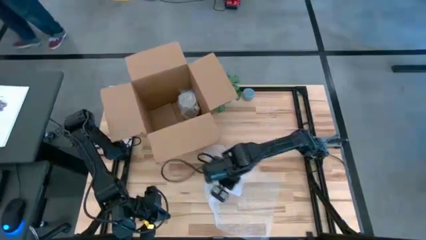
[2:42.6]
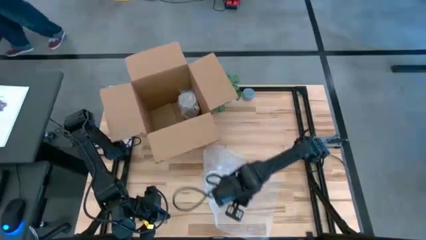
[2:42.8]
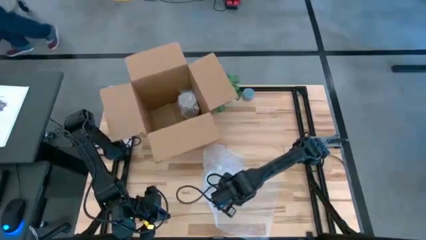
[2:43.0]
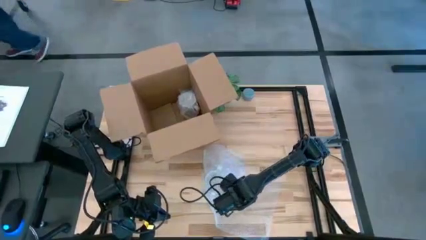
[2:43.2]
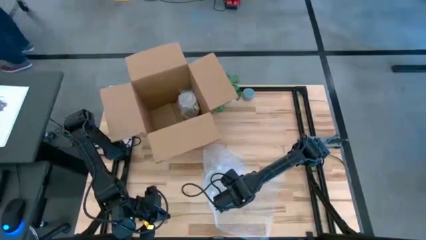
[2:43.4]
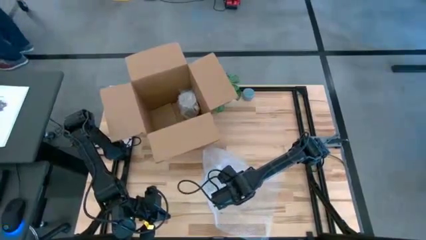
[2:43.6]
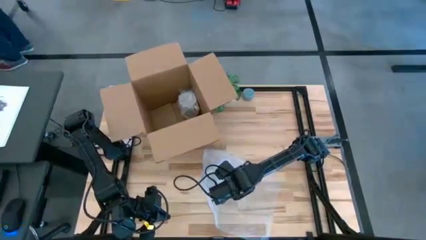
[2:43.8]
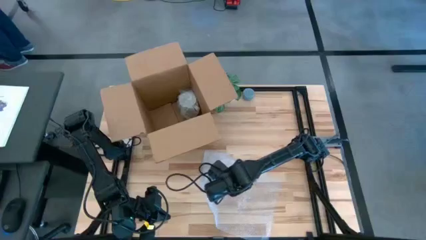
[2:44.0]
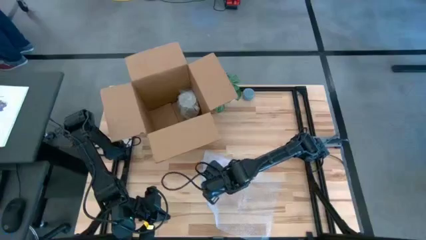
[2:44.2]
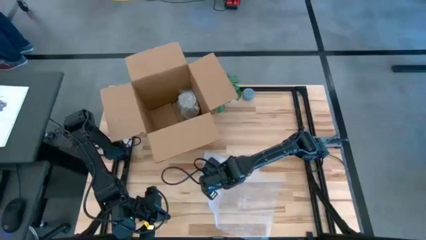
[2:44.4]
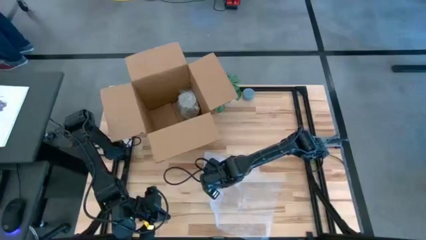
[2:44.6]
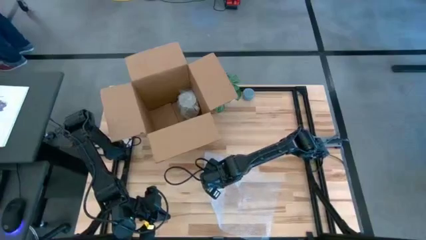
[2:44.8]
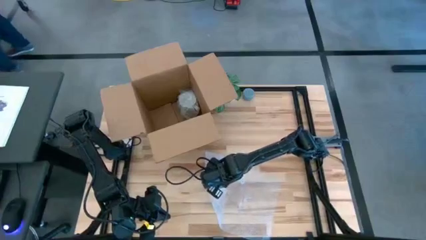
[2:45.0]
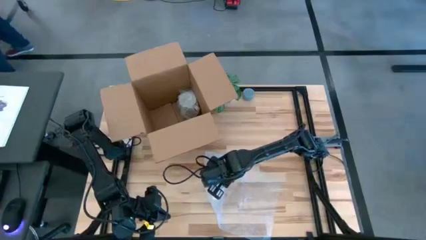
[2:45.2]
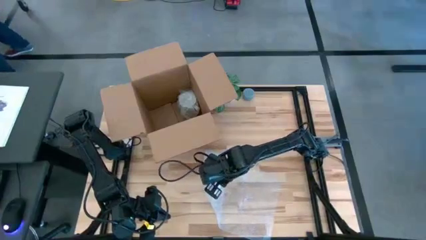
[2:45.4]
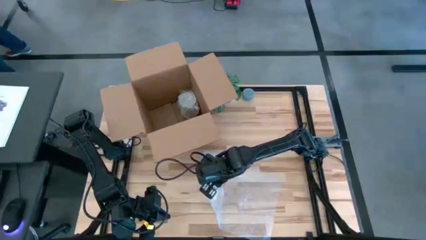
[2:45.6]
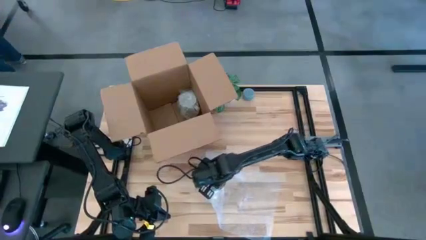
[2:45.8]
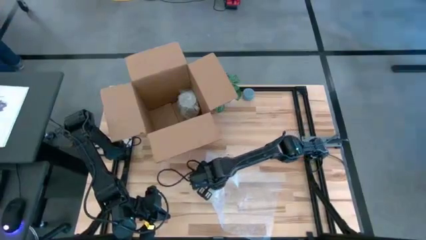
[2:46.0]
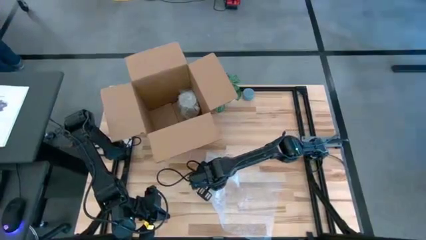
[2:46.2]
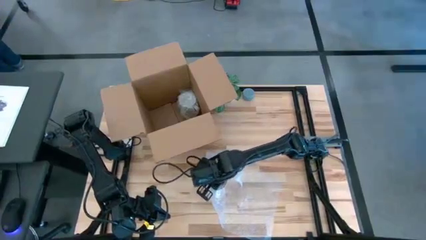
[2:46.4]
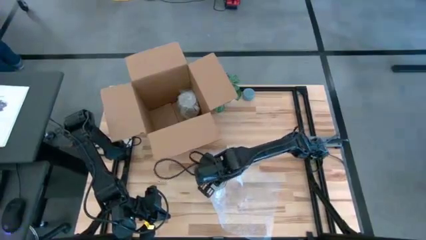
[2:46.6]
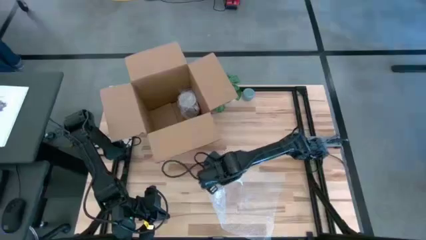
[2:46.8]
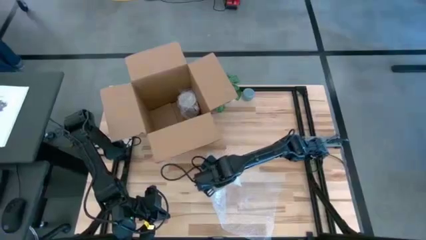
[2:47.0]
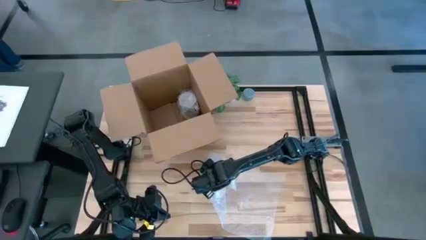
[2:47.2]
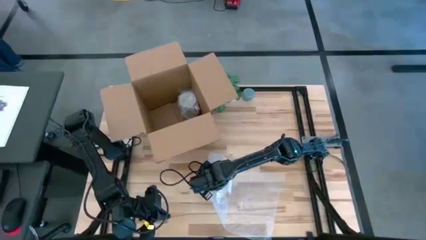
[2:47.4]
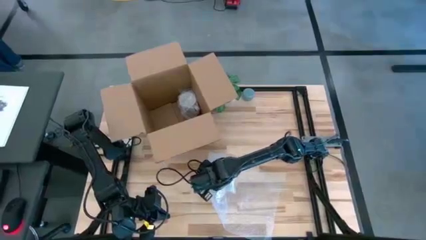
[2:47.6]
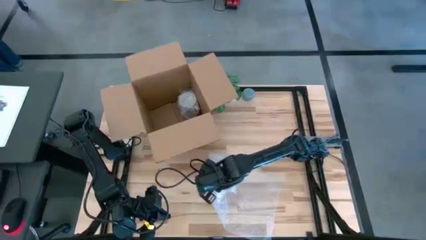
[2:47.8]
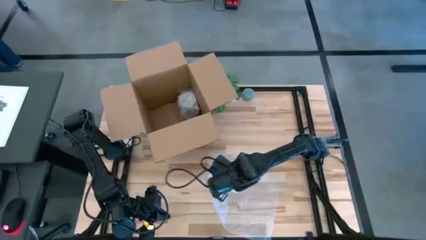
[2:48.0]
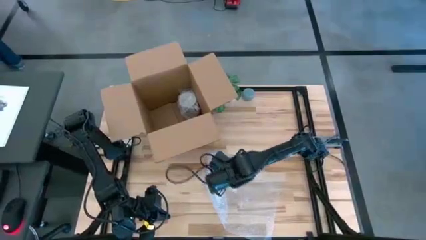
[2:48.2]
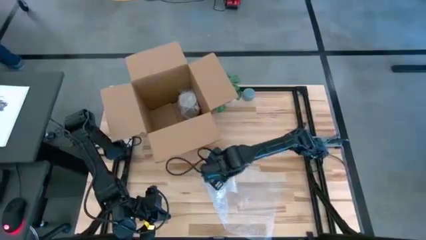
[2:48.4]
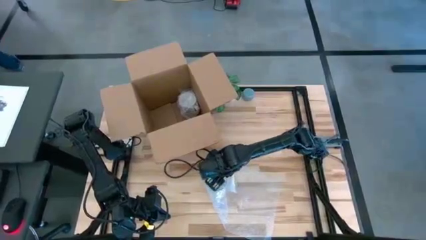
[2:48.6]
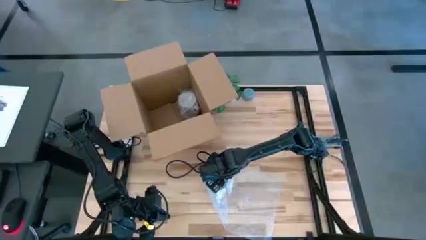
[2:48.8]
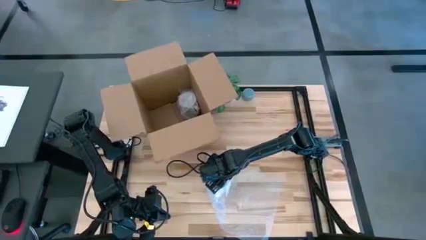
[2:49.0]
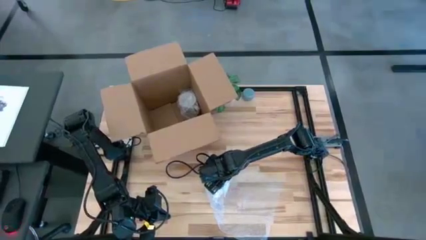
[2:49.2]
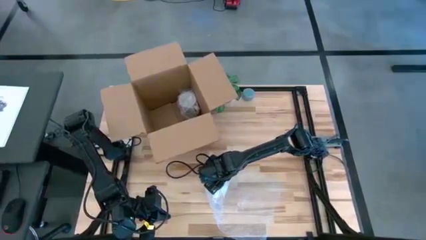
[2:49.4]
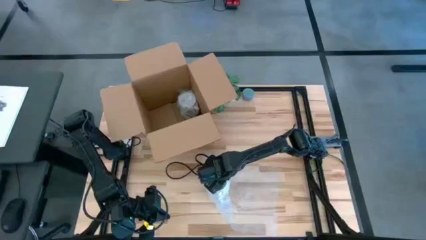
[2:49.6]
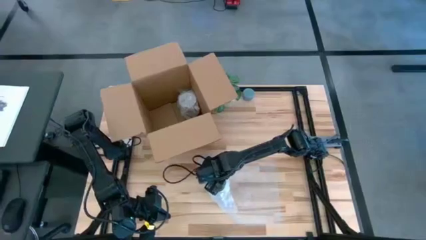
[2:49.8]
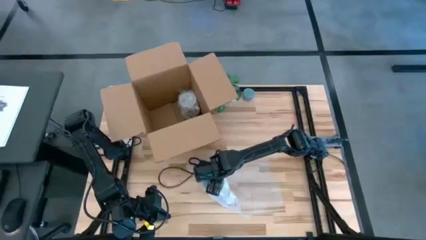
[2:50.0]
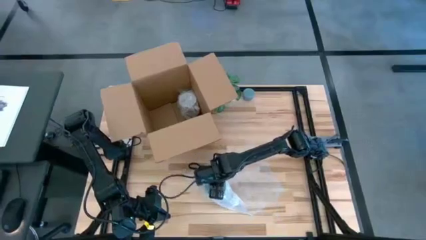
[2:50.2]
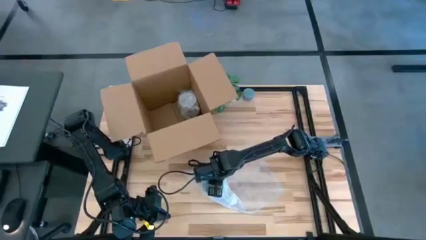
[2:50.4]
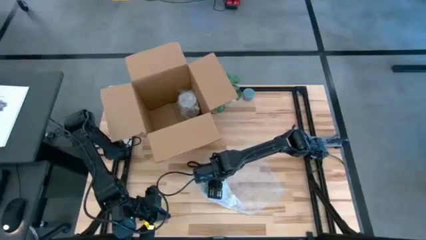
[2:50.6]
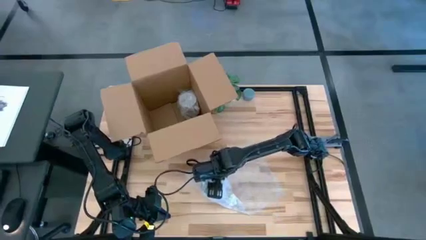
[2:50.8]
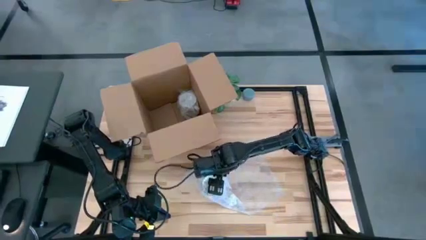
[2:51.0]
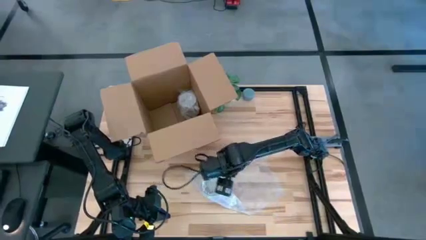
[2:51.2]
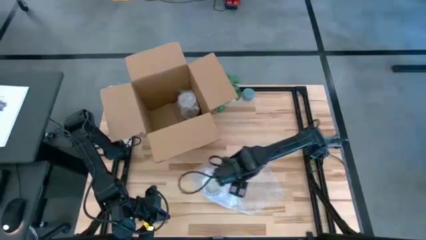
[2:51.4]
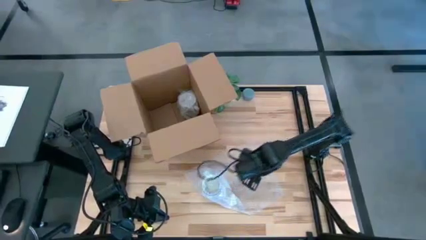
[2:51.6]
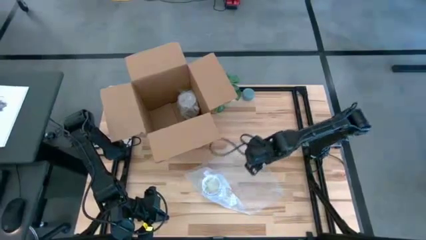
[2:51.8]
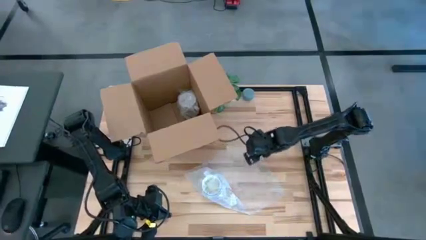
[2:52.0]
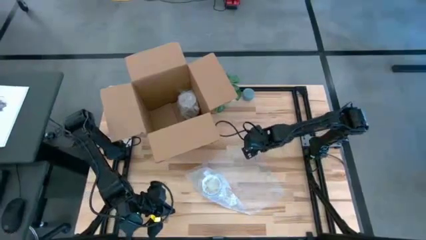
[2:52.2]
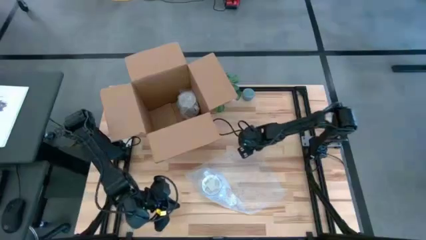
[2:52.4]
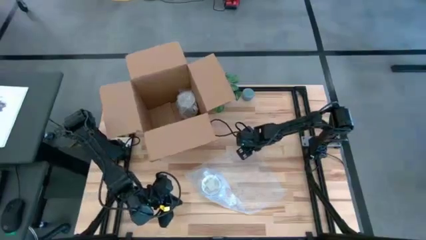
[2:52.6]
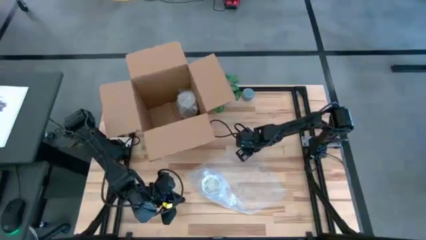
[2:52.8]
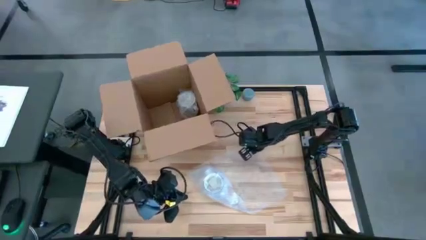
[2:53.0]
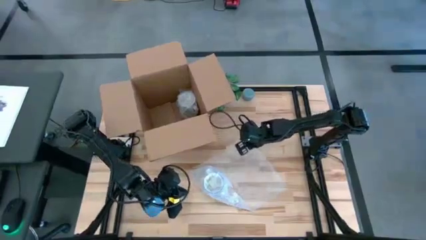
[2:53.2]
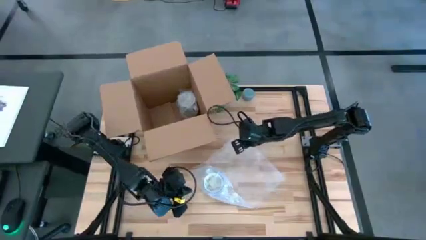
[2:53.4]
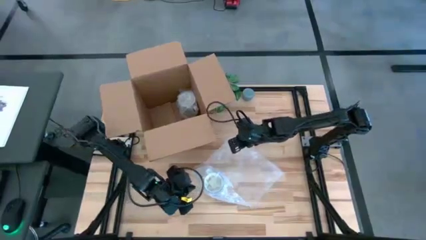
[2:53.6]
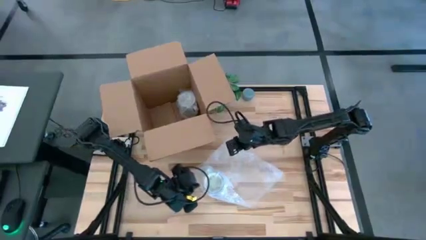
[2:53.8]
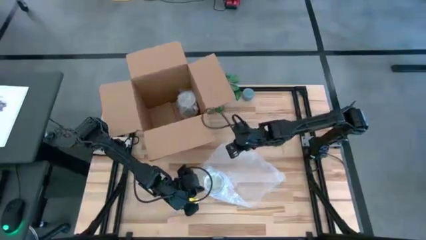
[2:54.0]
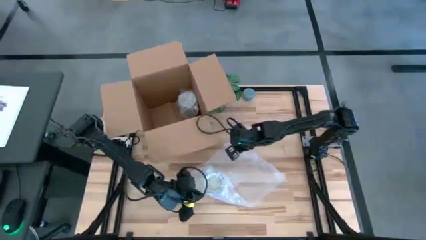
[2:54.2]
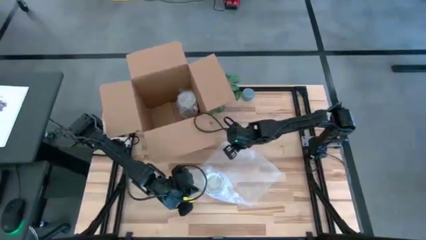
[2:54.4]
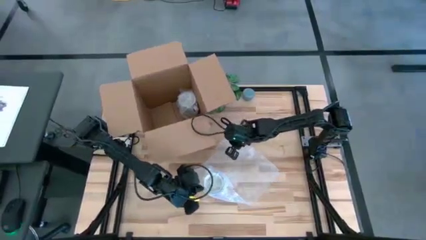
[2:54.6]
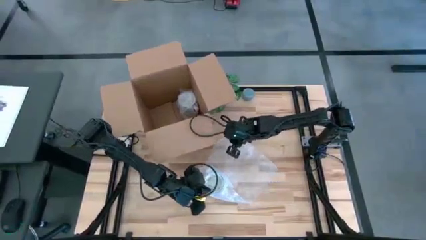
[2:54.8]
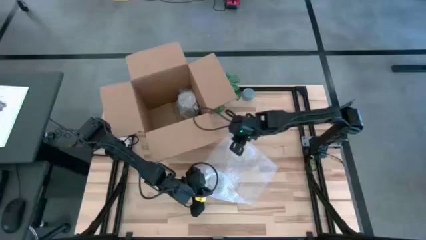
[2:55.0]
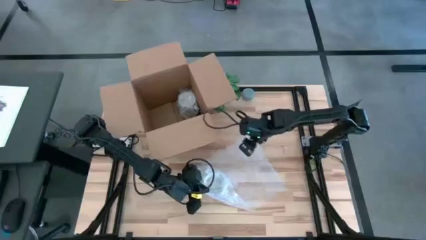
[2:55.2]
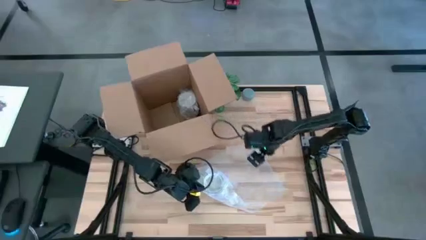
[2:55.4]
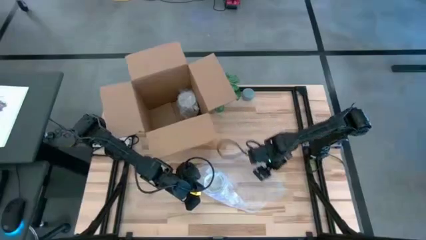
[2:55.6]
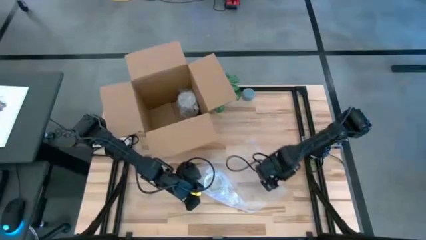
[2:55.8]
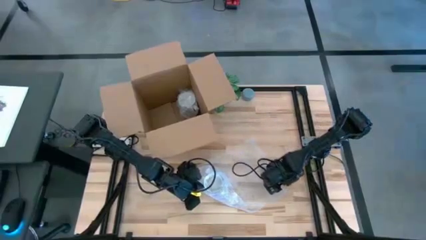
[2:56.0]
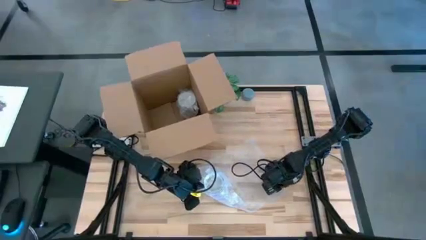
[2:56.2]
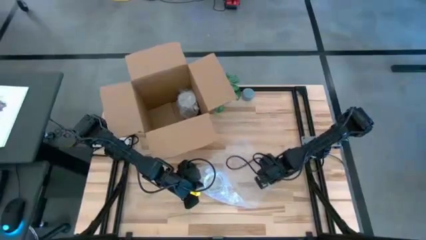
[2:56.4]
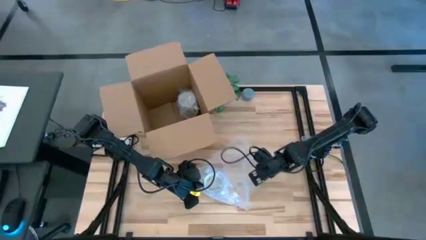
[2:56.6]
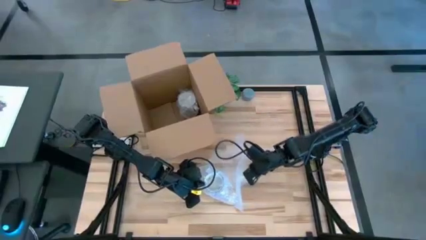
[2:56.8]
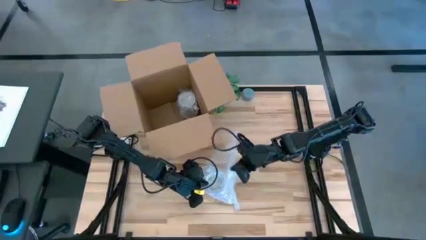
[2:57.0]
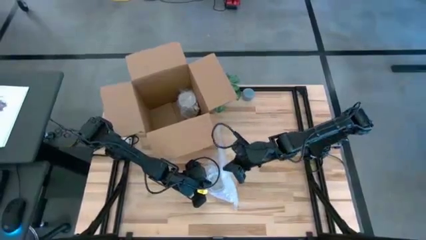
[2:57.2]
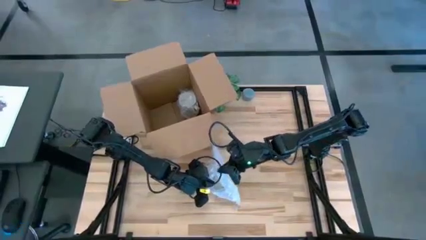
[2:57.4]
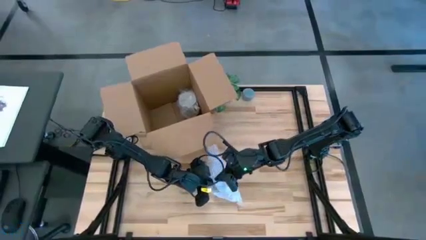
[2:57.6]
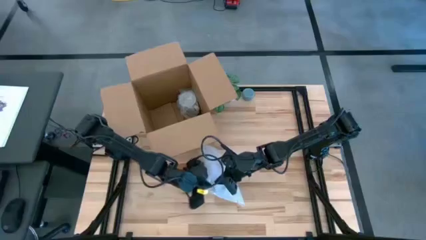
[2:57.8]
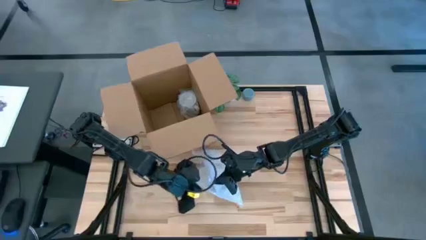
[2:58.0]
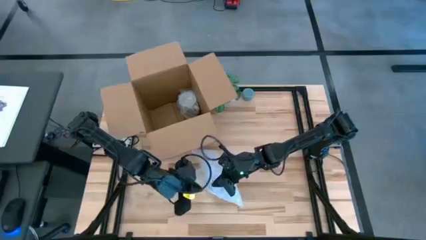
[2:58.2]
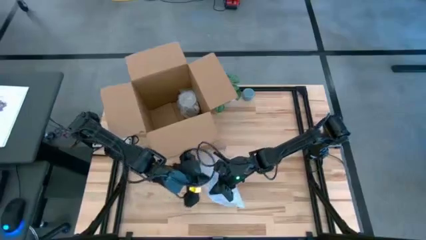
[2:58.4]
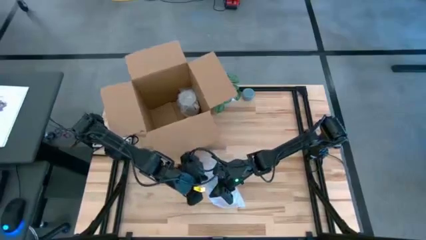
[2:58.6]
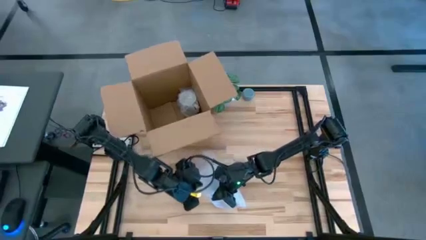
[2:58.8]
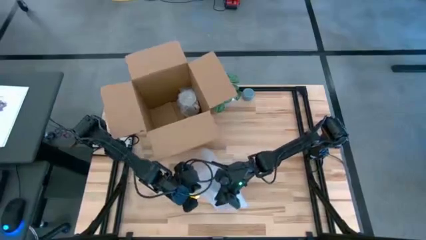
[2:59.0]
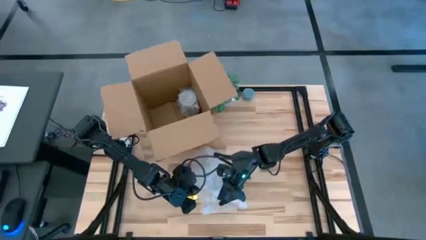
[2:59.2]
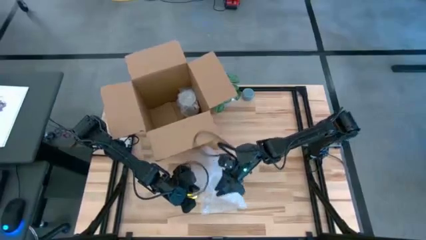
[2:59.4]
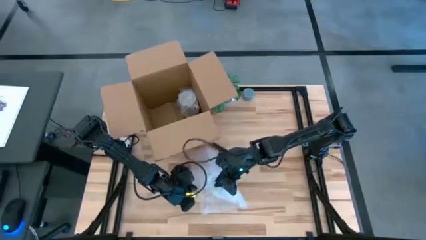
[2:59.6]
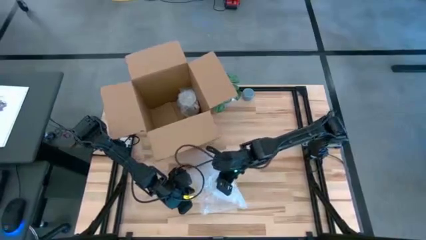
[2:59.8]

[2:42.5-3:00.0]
Task: wrap mug
Wrap the blue mug with the bubble wrap
